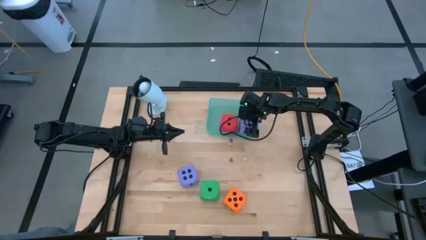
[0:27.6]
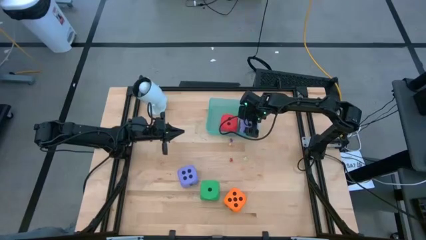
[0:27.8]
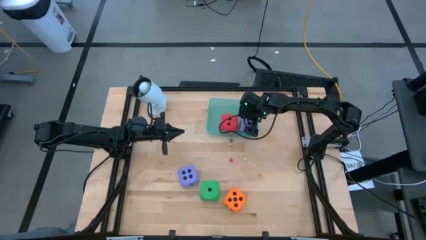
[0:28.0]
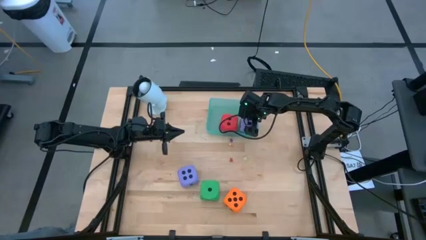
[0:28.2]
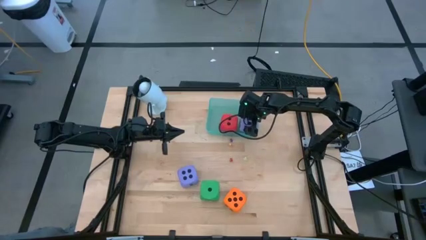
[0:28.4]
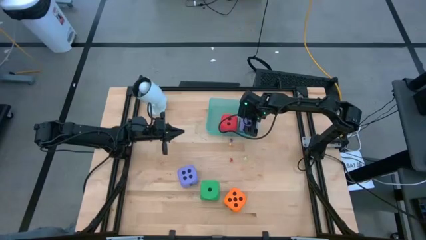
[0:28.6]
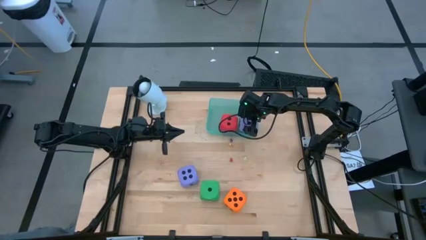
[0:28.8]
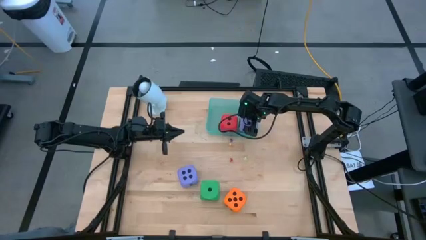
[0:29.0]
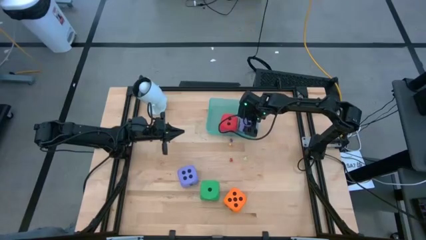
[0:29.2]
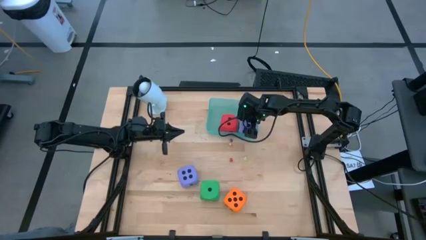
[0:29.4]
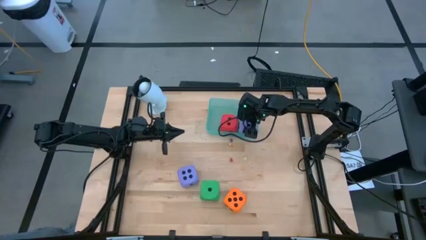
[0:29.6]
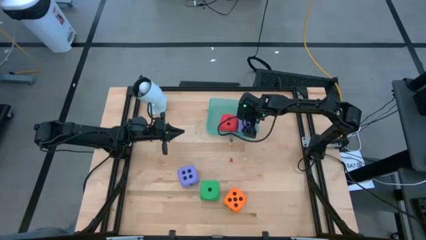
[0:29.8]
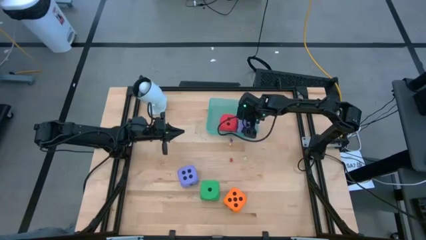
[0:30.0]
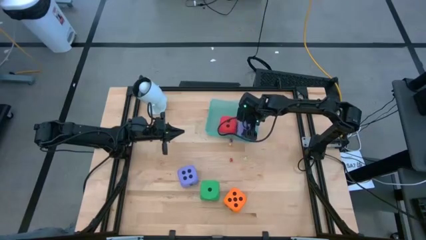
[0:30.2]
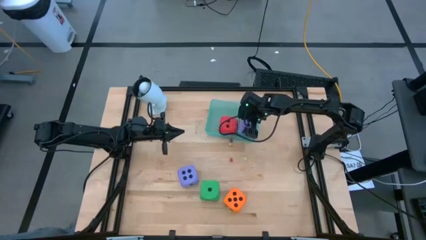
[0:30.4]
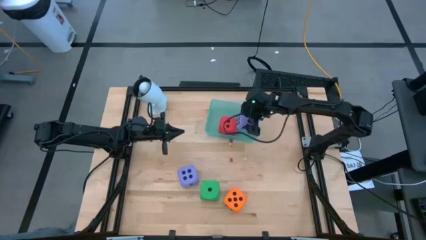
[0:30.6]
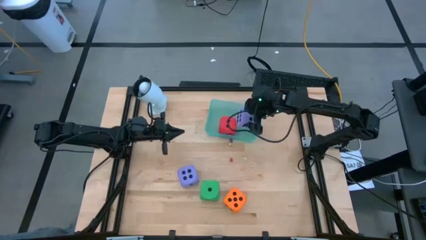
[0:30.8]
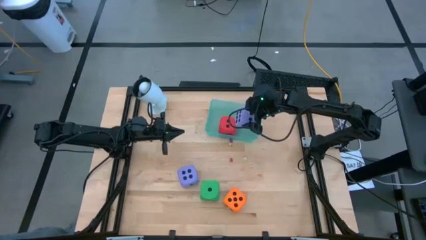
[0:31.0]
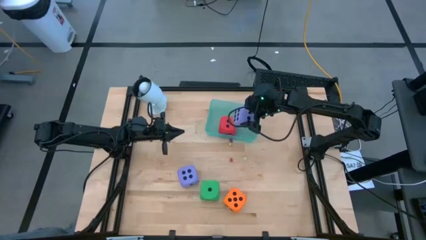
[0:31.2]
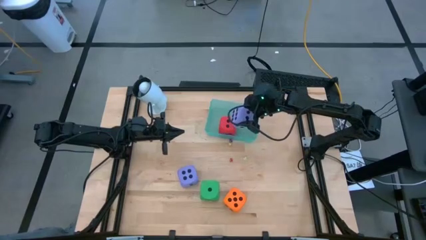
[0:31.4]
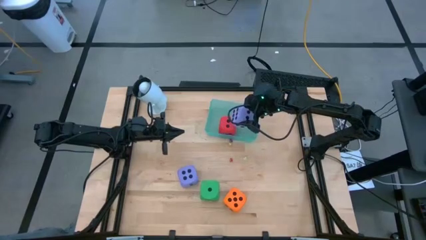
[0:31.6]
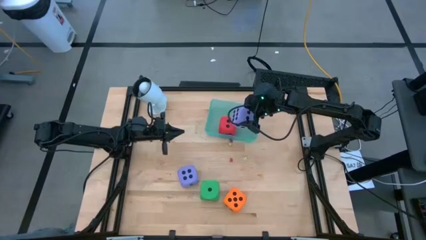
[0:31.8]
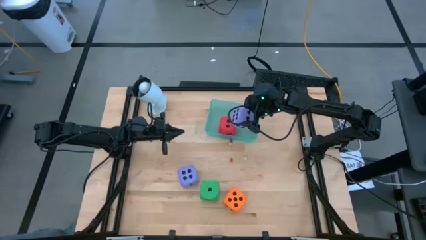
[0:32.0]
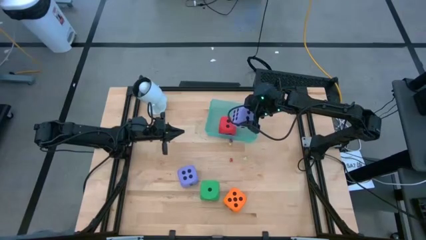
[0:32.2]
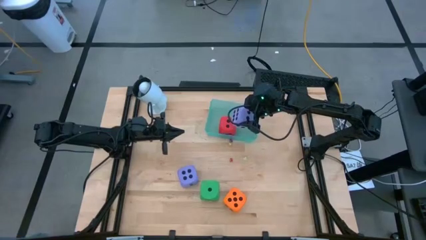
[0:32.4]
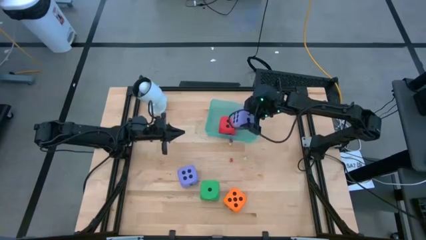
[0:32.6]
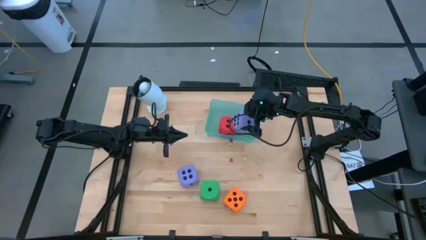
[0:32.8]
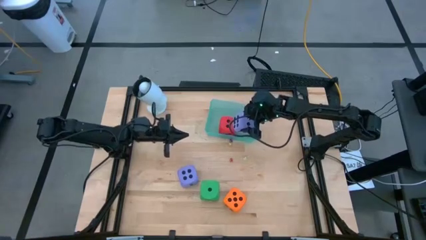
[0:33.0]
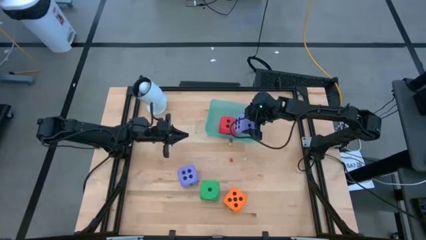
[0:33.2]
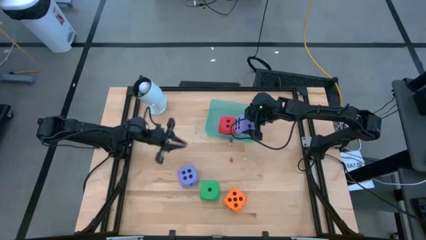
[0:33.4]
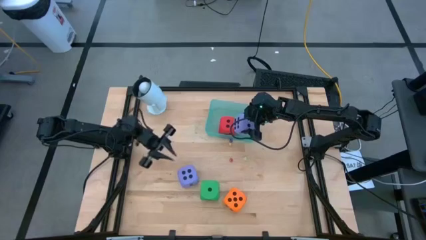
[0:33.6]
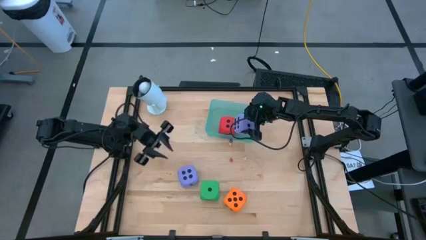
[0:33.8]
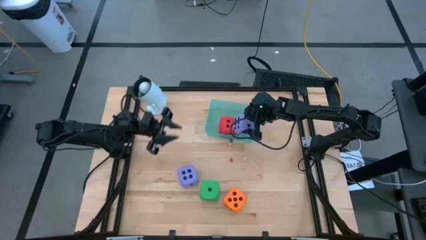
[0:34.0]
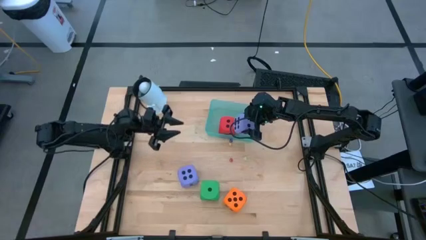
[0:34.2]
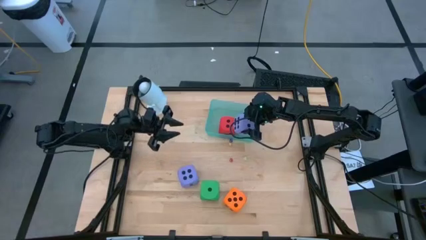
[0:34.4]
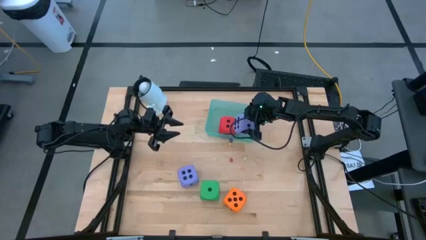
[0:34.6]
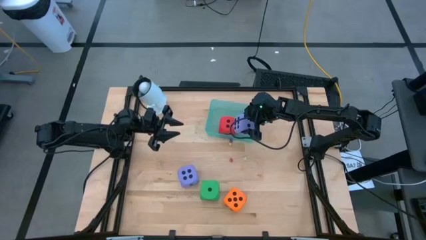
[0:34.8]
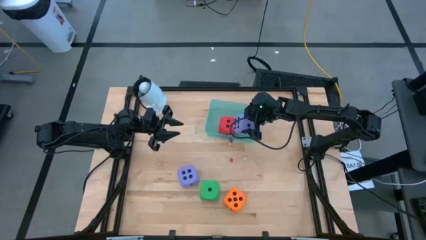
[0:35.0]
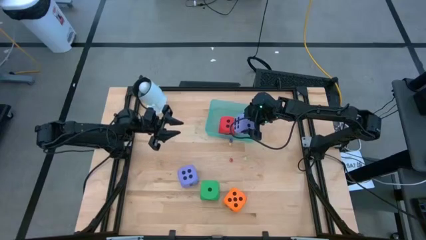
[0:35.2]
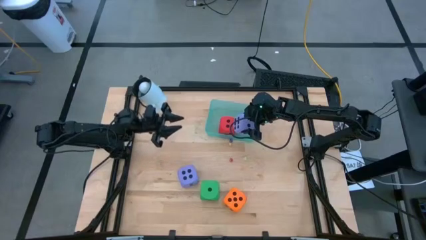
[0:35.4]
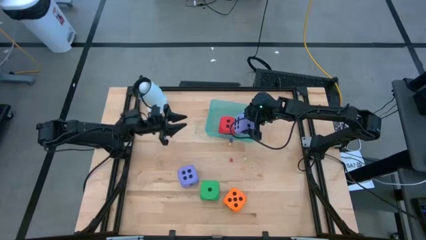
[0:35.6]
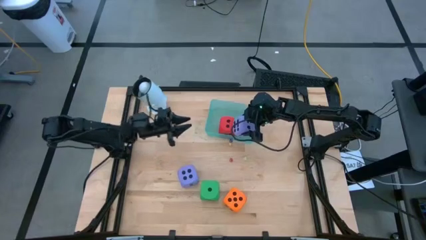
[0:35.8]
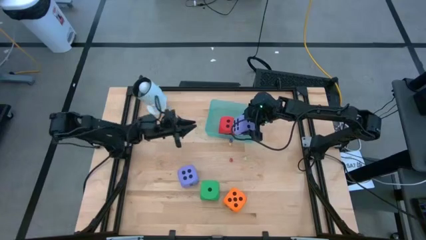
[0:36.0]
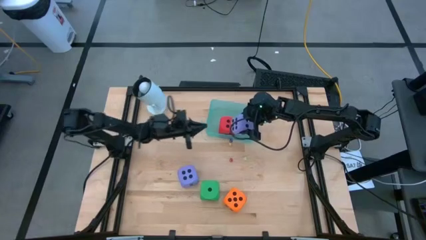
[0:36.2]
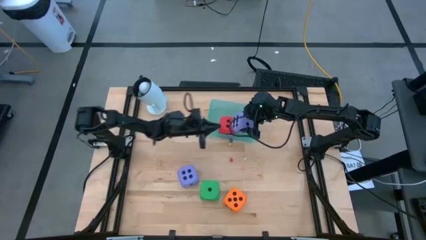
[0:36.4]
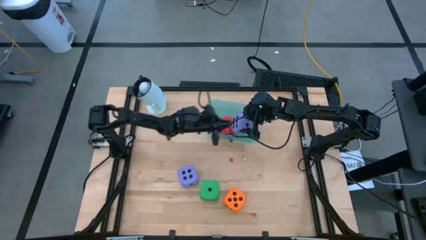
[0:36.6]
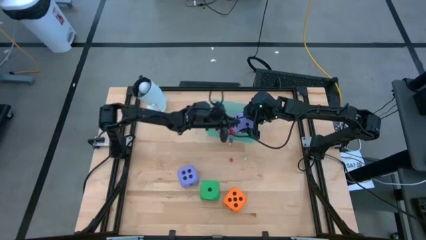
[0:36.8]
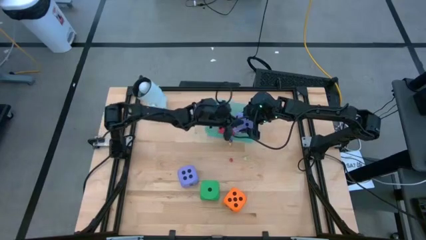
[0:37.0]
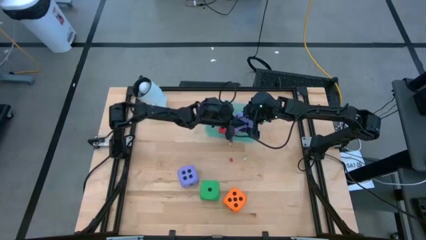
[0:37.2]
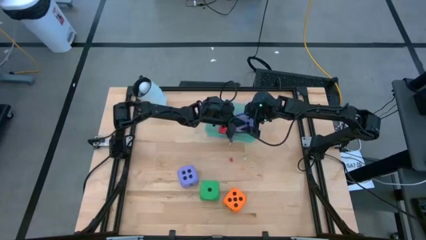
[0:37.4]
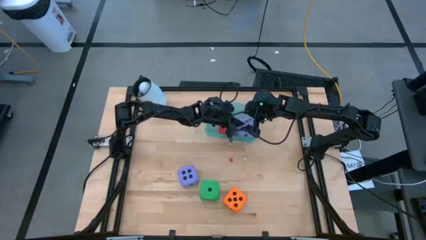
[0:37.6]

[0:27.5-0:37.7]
Task: Pick & Place Dice
Put the right large purple die into the blue bin

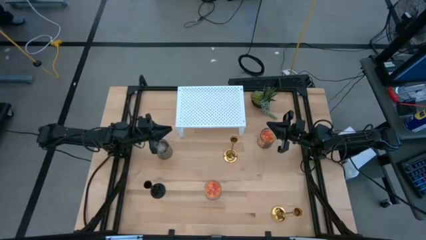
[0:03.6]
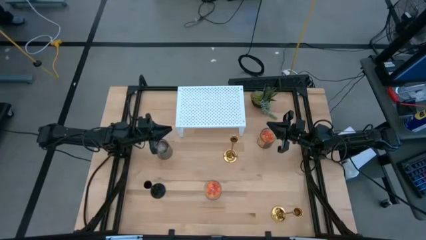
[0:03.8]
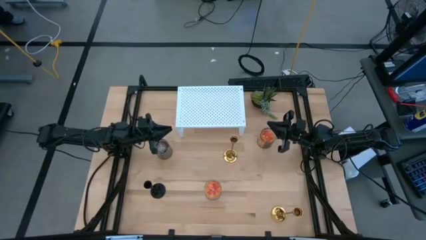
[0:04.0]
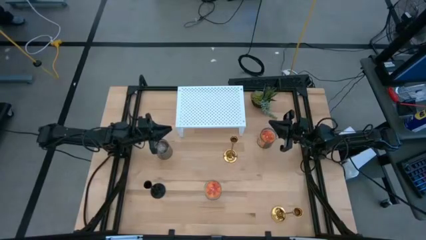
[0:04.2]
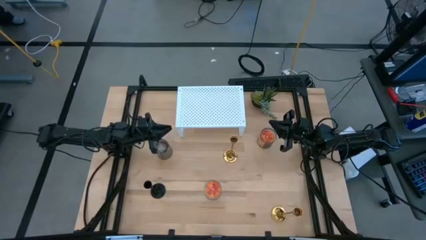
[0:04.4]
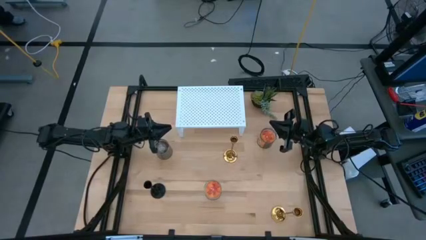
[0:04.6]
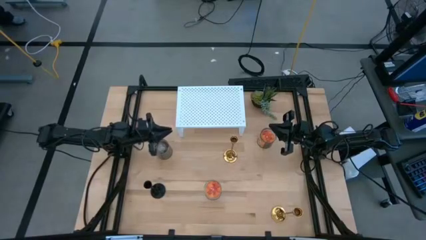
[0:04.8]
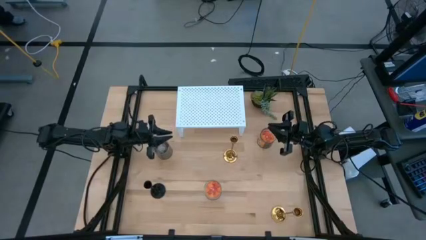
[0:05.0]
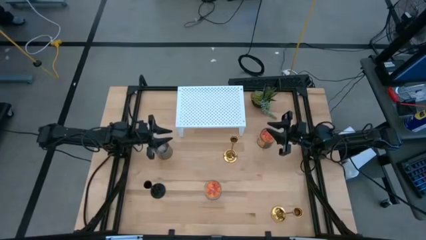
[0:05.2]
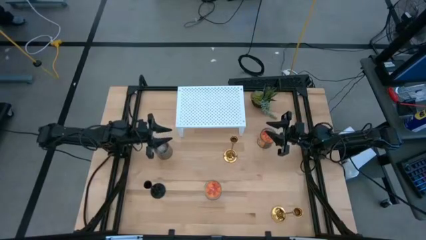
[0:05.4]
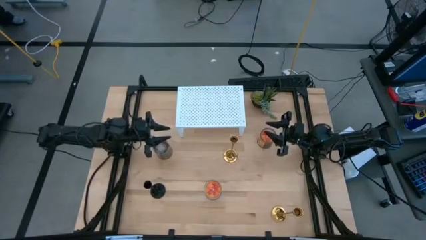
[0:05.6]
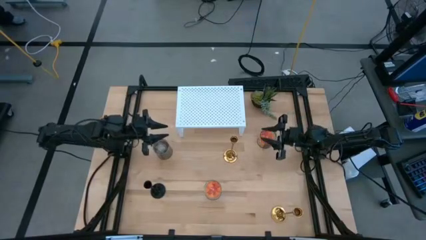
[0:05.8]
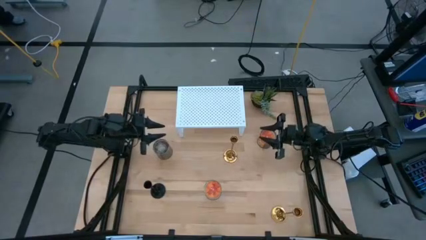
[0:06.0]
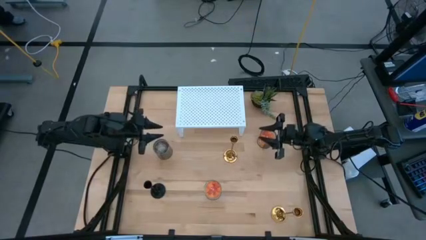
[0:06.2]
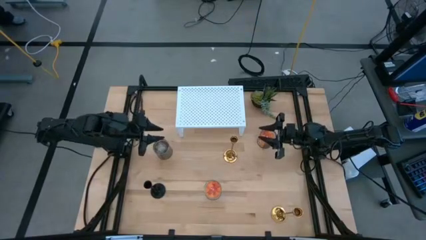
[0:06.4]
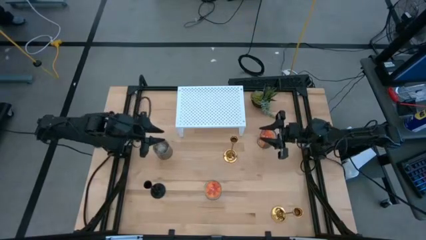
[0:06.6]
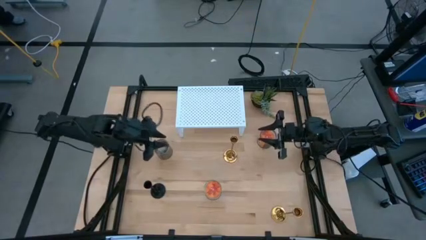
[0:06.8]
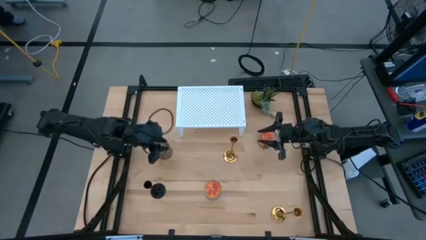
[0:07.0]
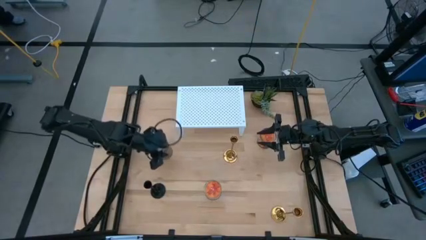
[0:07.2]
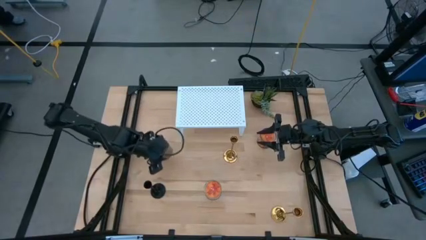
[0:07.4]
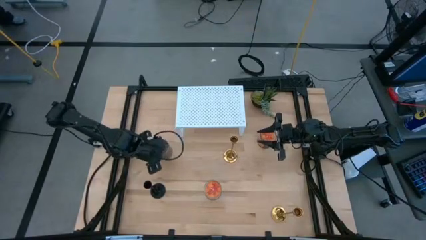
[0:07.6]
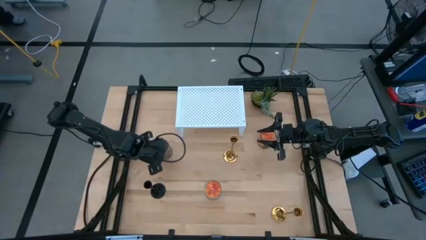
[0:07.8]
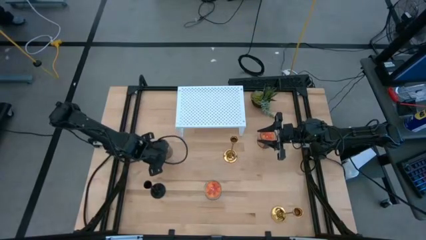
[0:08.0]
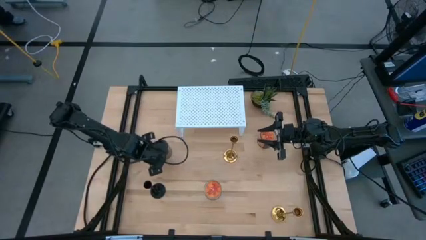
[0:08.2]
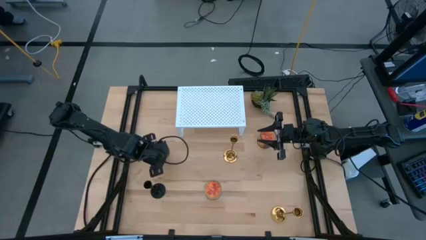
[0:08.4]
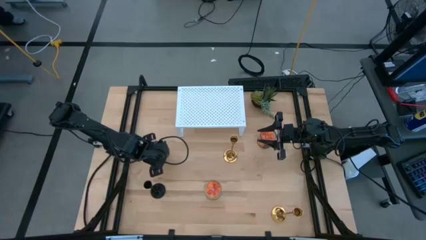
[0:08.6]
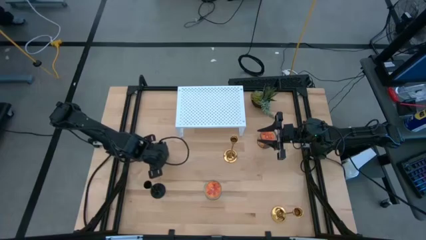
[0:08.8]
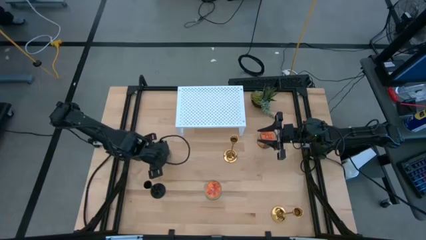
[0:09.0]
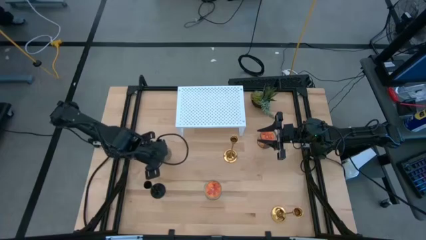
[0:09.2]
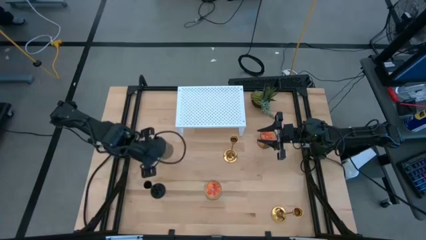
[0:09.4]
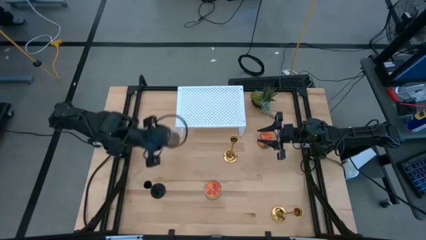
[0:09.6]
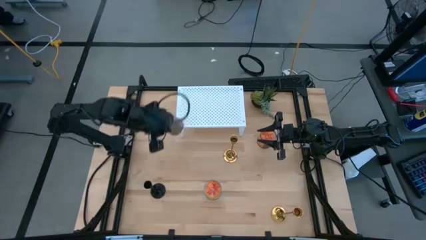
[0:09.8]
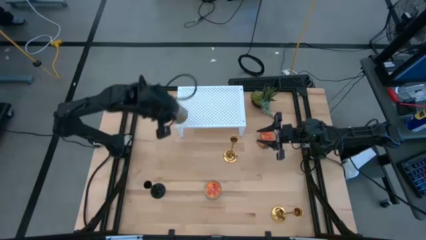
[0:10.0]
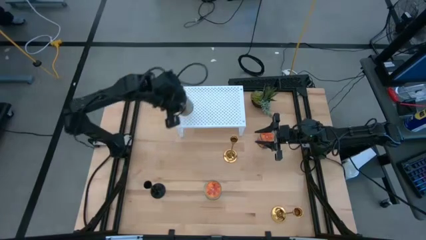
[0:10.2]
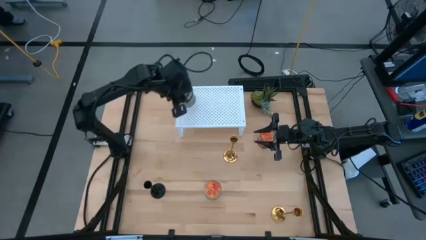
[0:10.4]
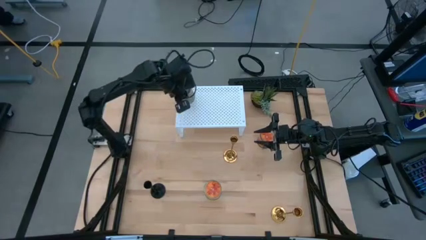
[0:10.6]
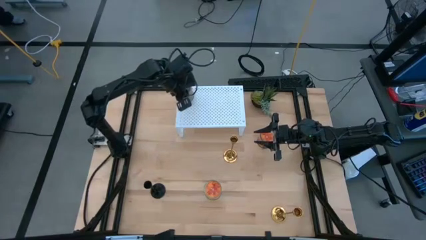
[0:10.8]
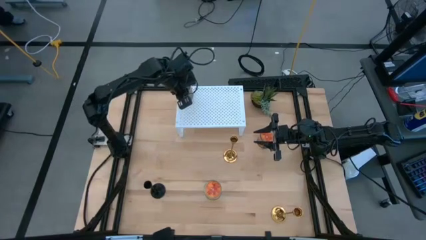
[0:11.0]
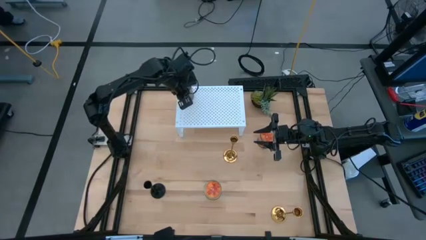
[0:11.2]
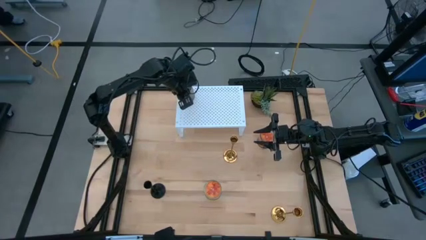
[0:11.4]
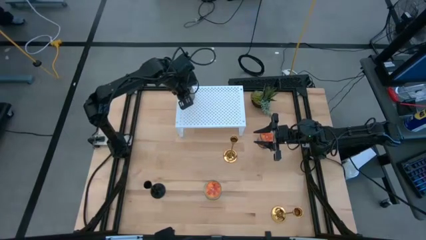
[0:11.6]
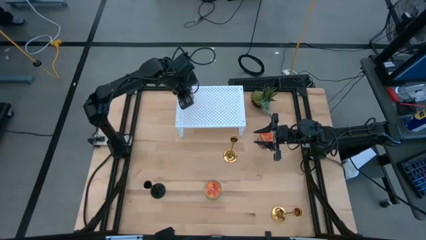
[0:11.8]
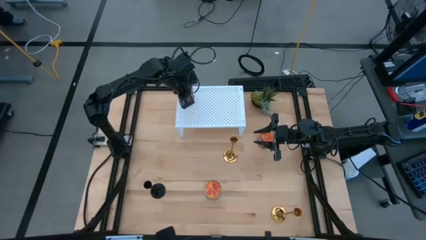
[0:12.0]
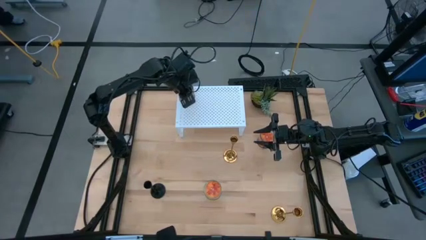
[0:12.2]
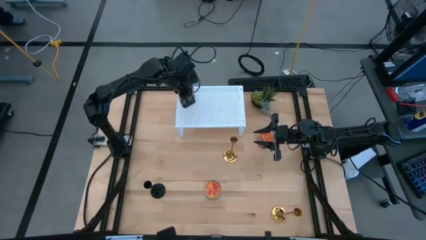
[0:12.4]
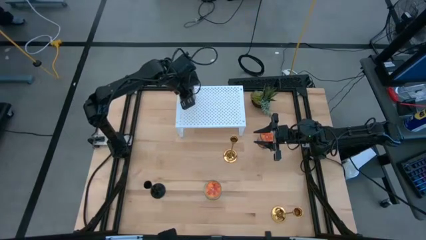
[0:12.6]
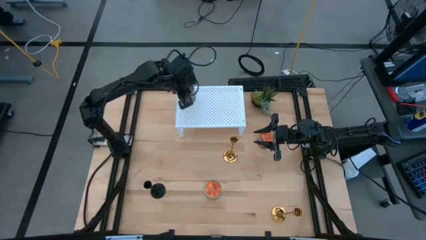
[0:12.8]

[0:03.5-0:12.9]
Task: Pick & Place candle stick holders
Put the brown scented candle on the shelf
